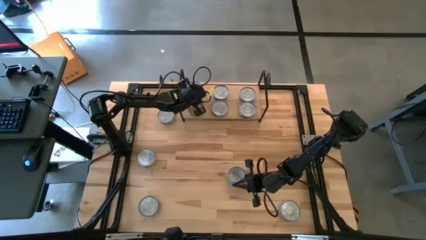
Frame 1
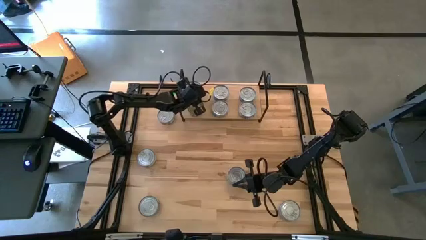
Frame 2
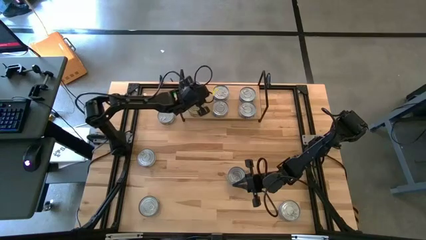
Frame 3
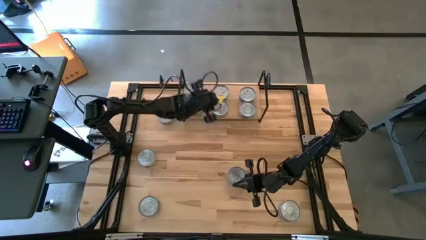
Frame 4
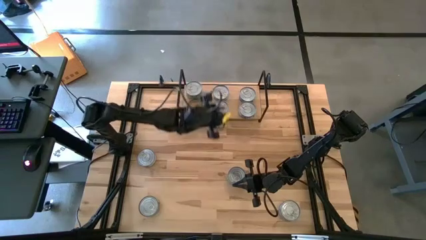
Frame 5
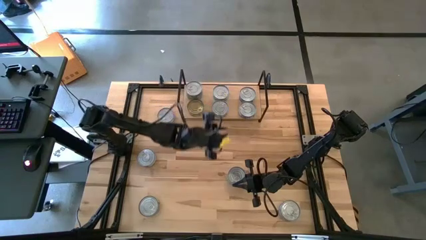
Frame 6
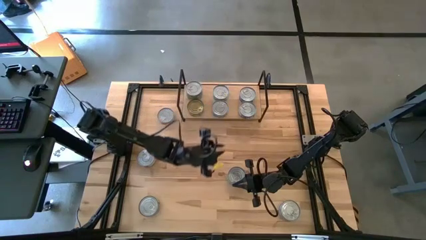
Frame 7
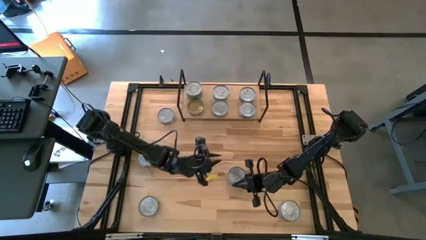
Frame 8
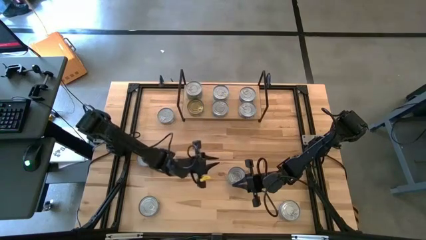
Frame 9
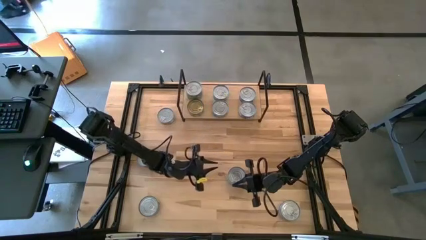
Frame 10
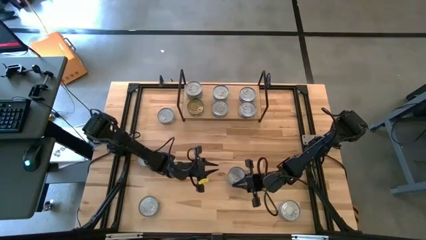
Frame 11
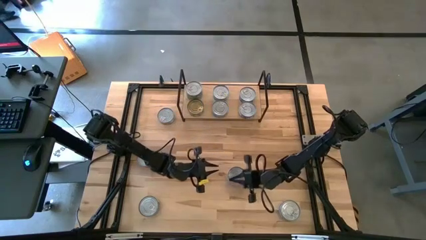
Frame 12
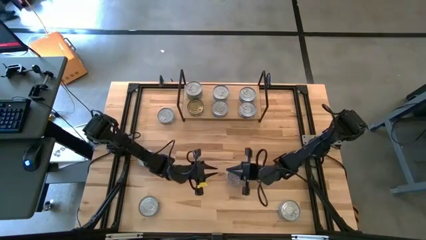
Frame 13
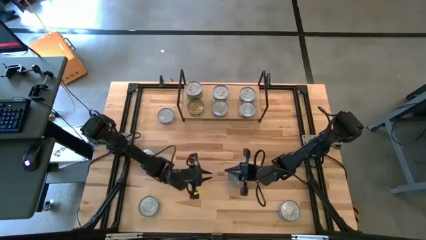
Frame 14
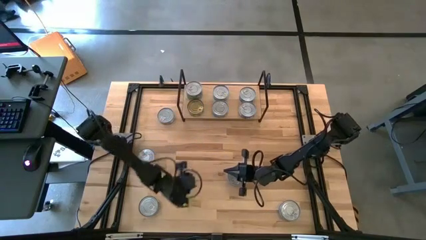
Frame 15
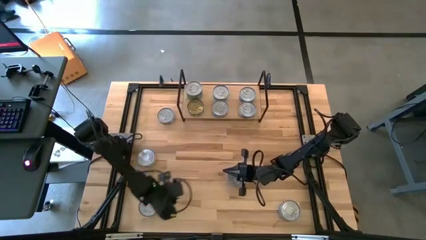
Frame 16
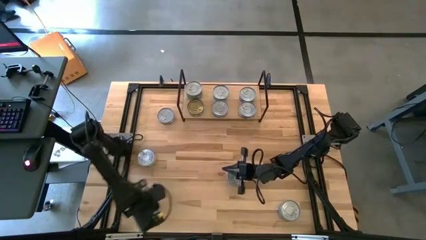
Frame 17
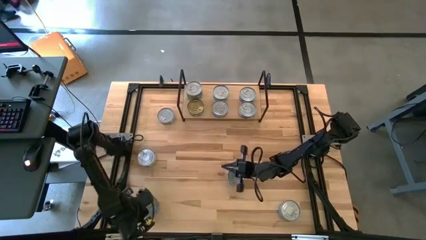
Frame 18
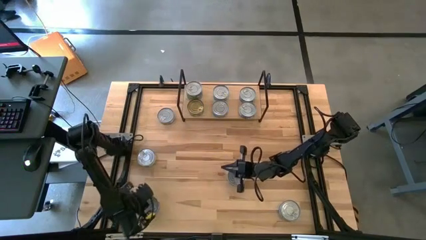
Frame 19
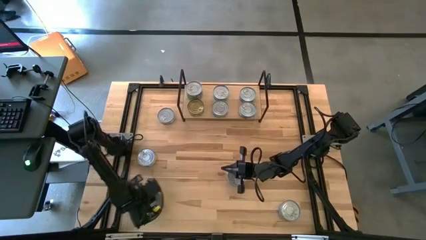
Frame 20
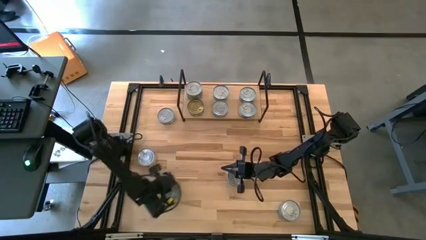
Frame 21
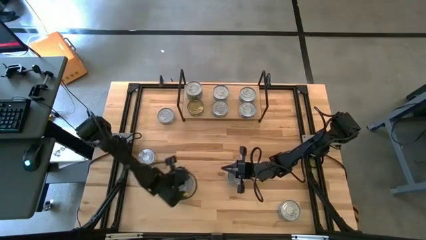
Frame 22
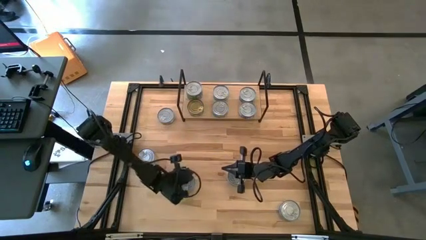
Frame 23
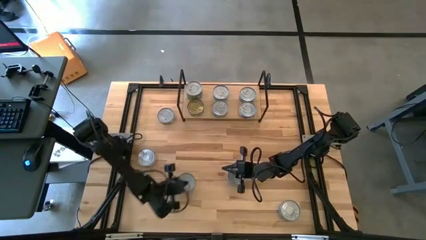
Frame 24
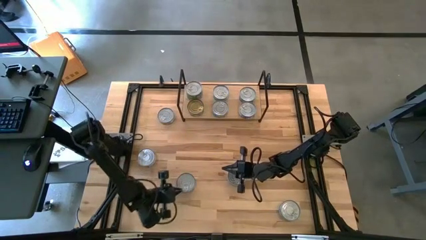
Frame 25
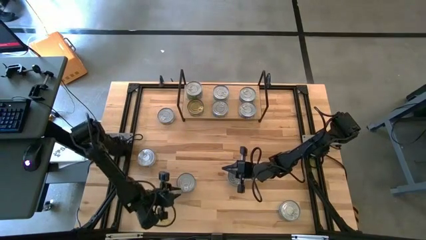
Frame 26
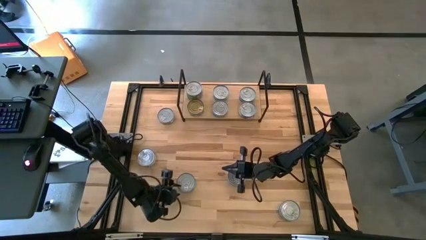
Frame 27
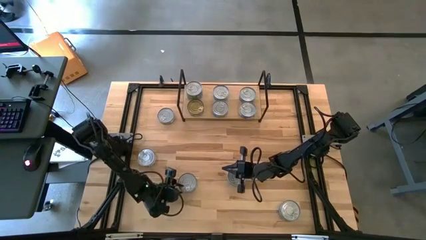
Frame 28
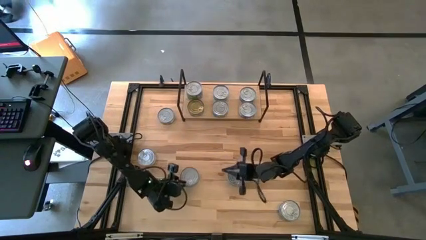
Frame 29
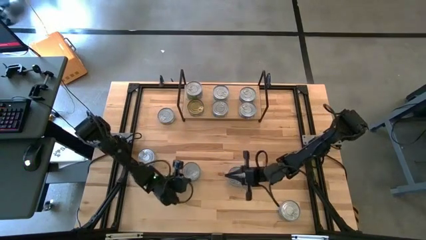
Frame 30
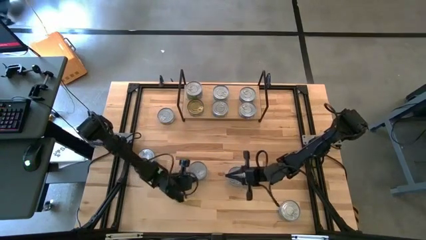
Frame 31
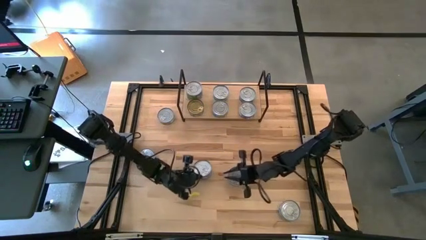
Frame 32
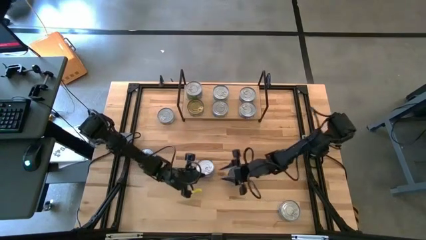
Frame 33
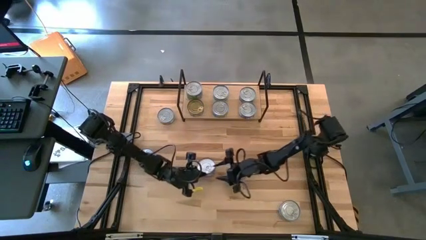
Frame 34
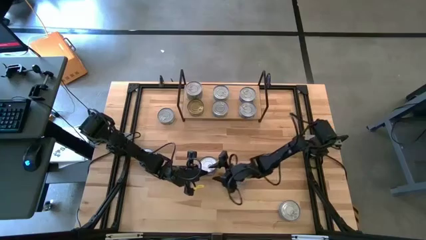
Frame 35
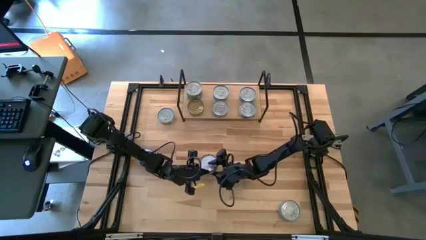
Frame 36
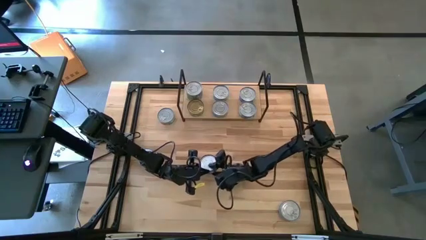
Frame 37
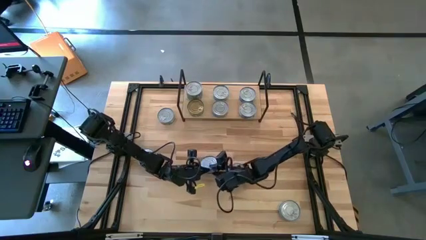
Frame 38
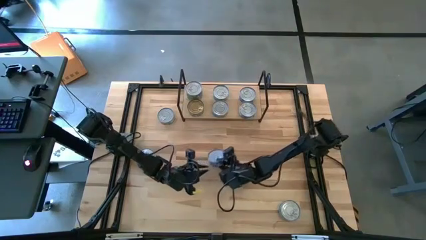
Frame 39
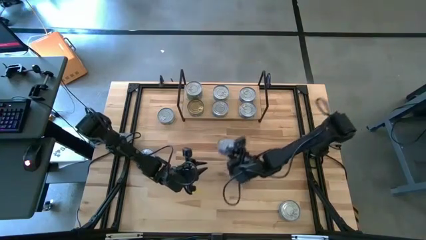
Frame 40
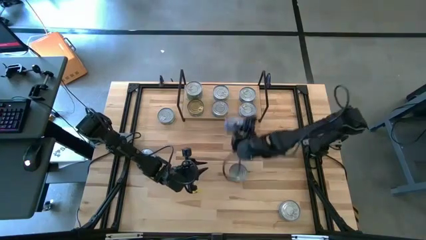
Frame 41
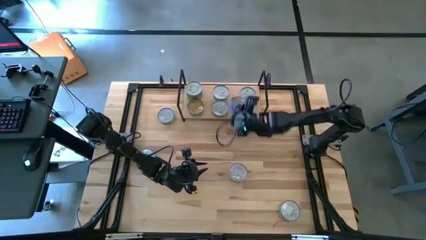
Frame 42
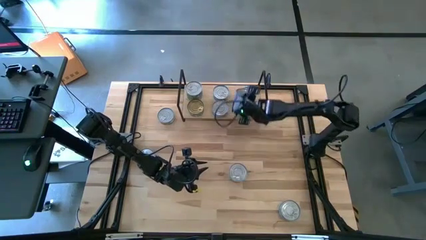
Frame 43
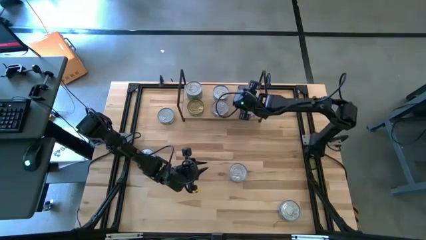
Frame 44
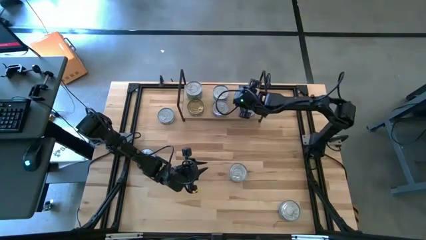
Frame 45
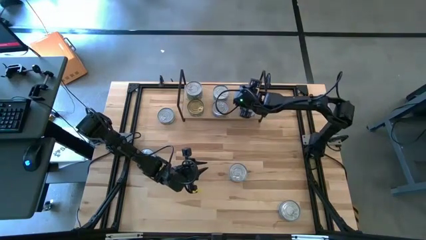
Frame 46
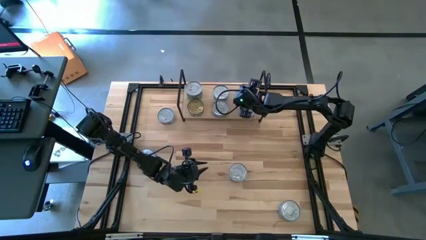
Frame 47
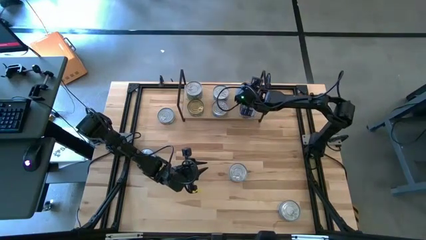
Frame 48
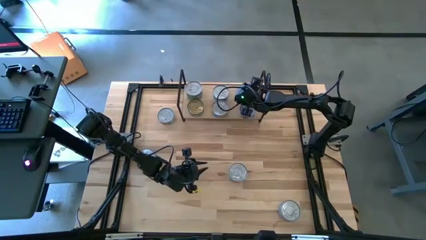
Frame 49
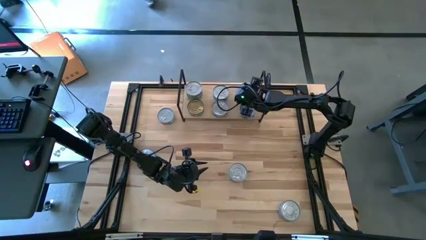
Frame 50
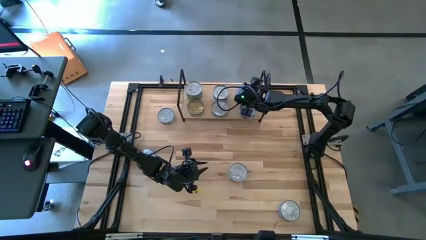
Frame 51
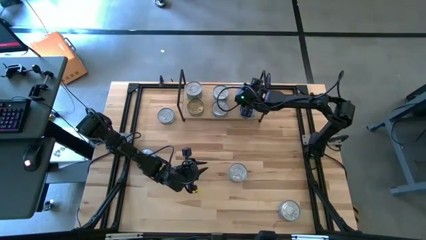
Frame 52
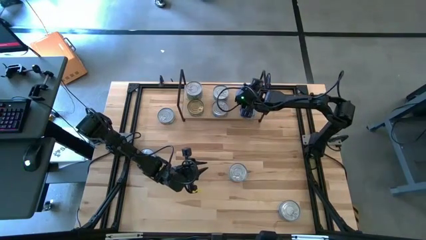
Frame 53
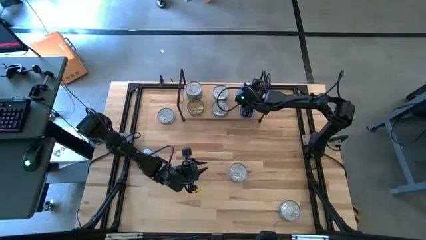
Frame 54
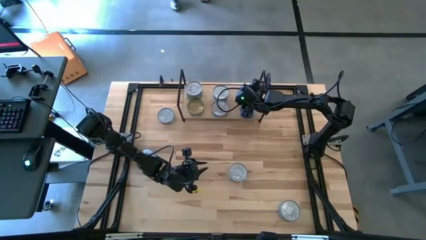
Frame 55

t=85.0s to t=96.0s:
Task: Stack canned seafood by type on shelf
Stack the blue tuna can on top of the other blue tuna can on the shelf

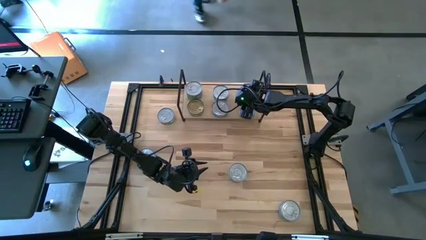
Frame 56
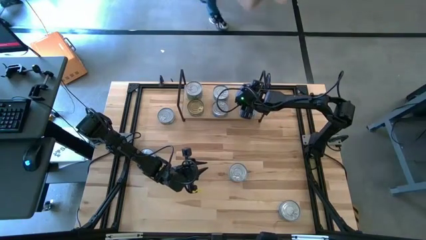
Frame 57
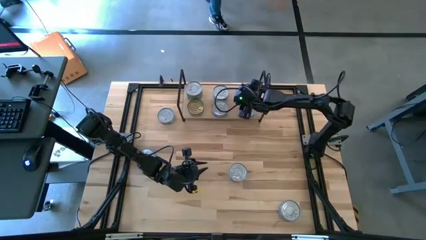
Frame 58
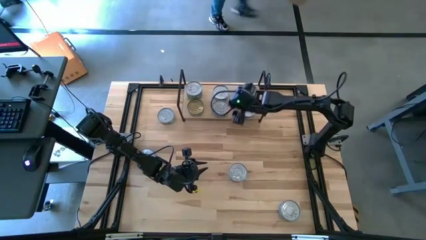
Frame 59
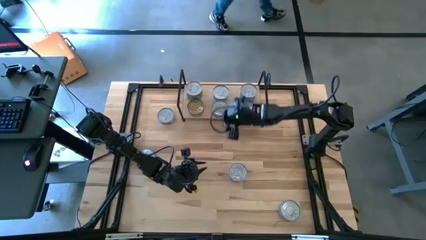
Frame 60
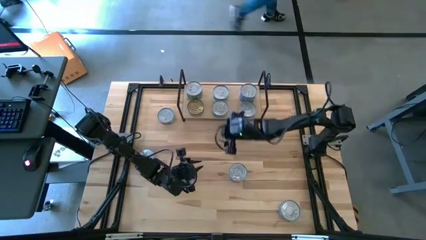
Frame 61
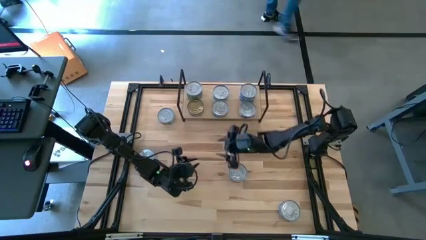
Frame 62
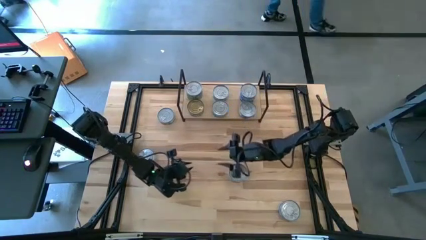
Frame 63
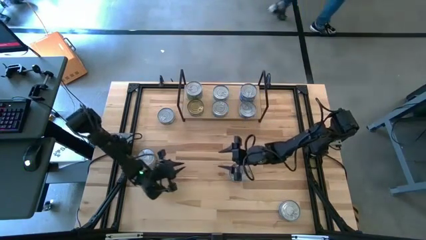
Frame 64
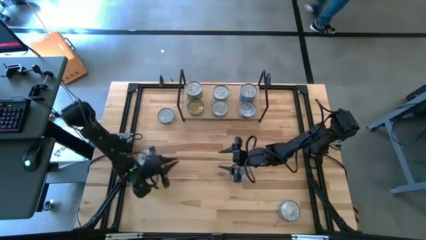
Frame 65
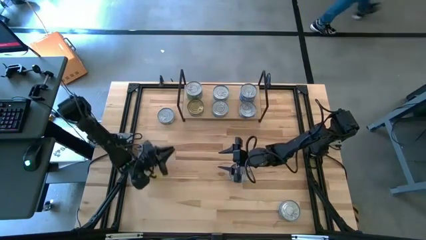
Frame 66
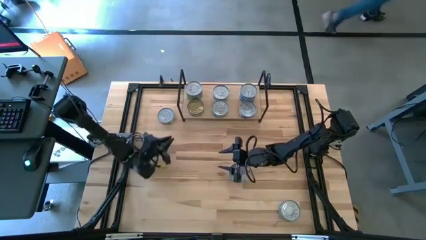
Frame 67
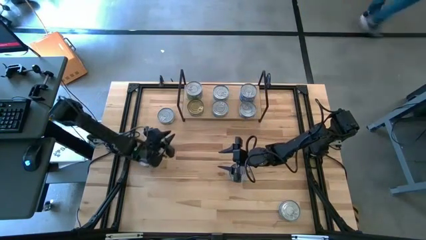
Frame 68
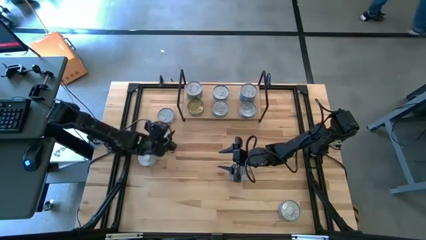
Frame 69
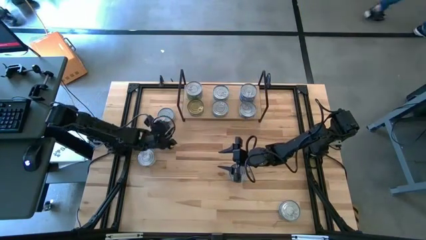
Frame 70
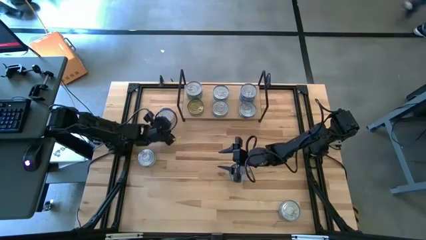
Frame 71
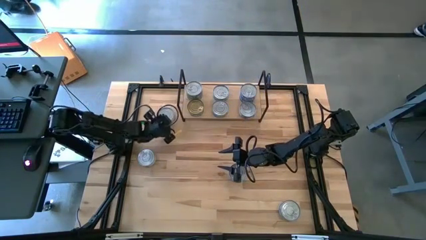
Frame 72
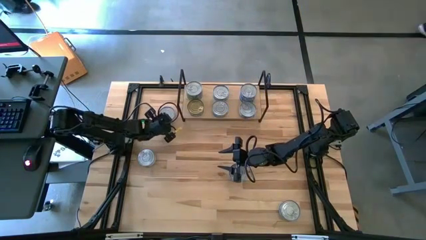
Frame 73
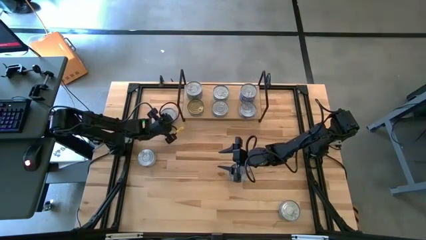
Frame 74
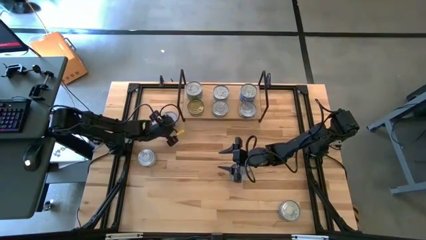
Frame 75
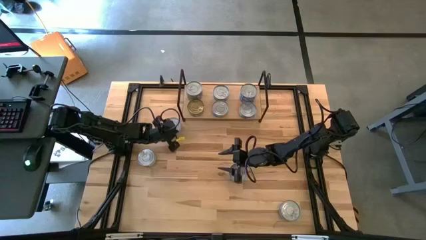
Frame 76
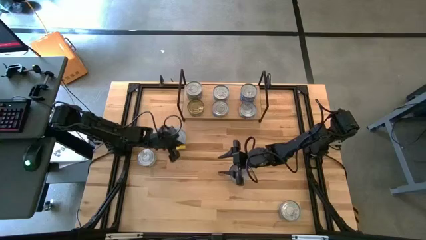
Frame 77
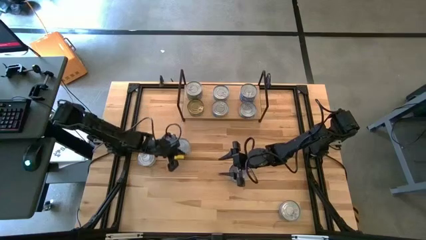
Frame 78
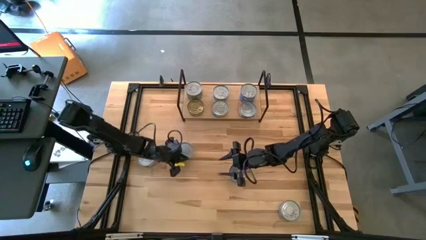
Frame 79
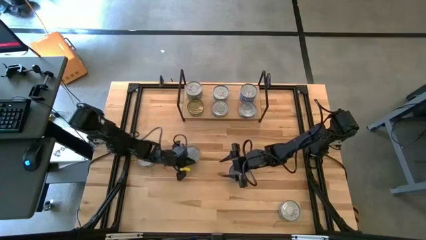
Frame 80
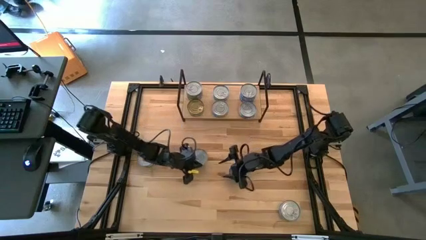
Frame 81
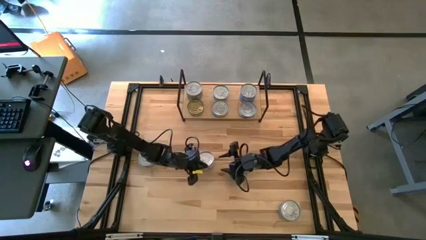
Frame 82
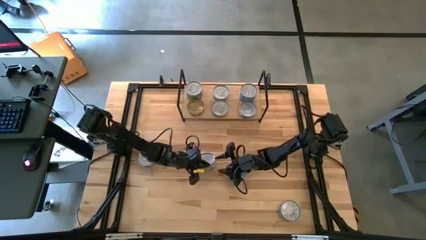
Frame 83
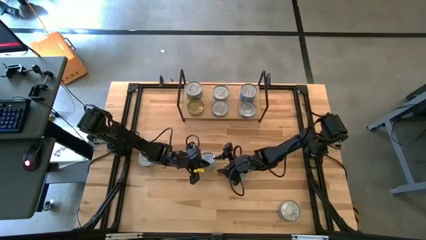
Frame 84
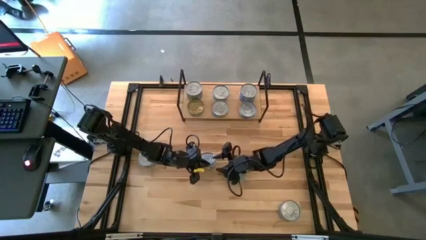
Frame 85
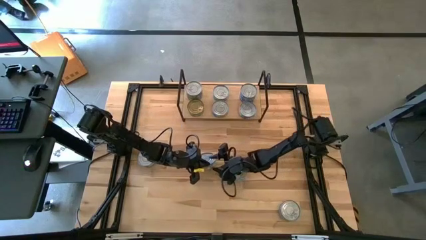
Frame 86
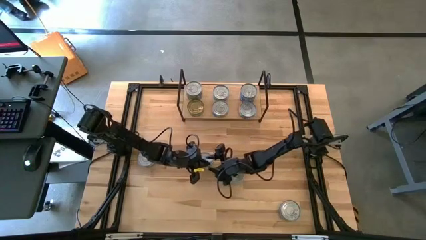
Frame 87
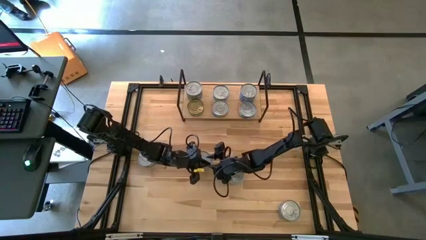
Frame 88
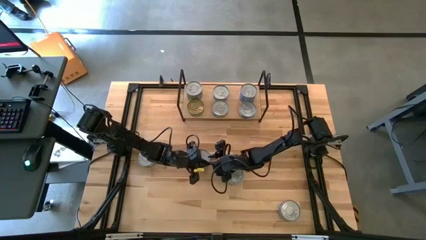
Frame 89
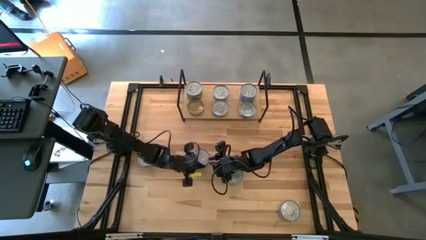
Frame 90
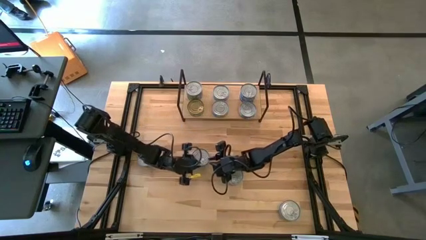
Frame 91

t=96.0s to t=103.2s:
Stack the yellow and blue tuna can on top of the other yellow and blue tuna can on the shelf
